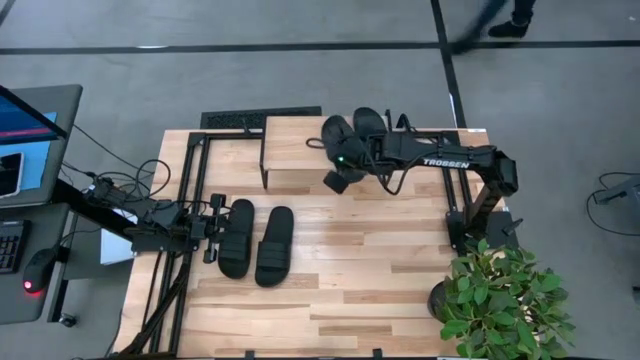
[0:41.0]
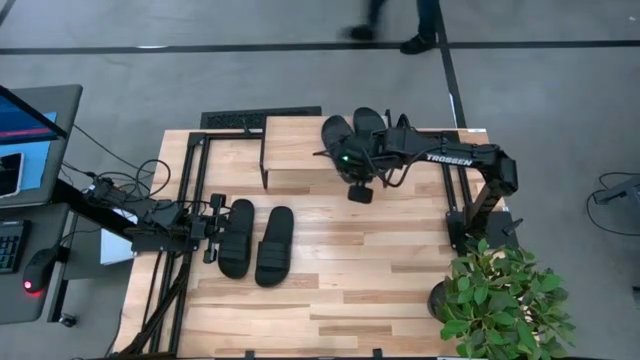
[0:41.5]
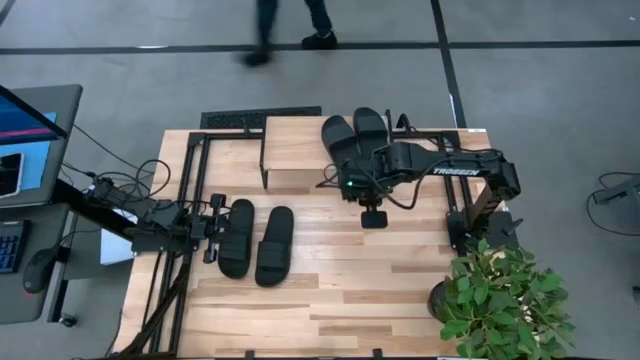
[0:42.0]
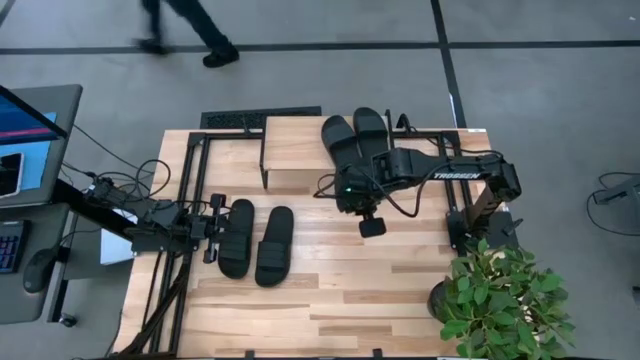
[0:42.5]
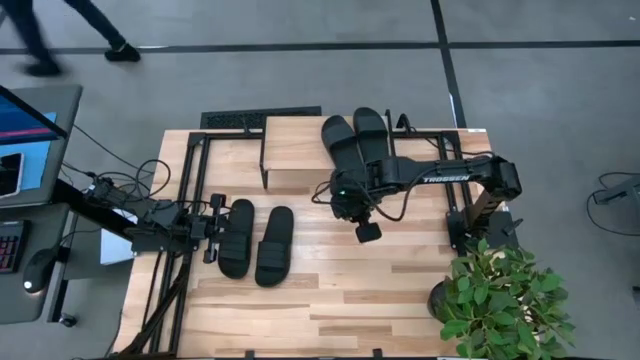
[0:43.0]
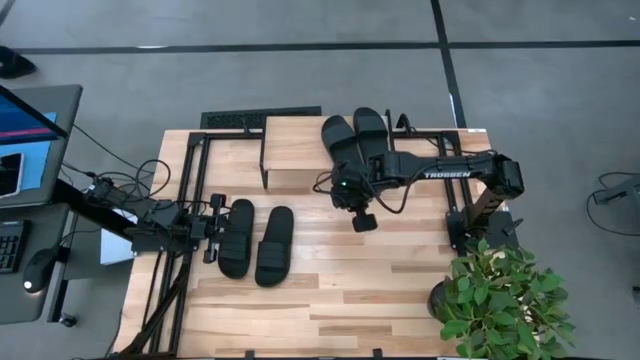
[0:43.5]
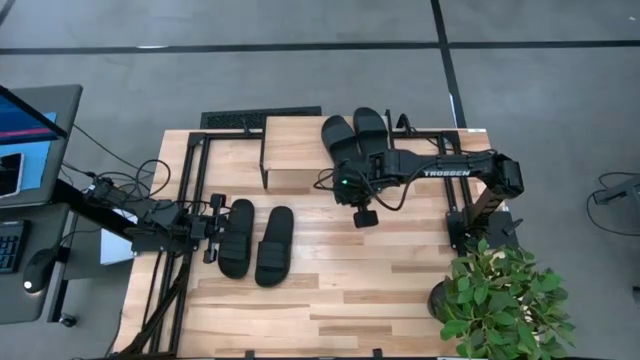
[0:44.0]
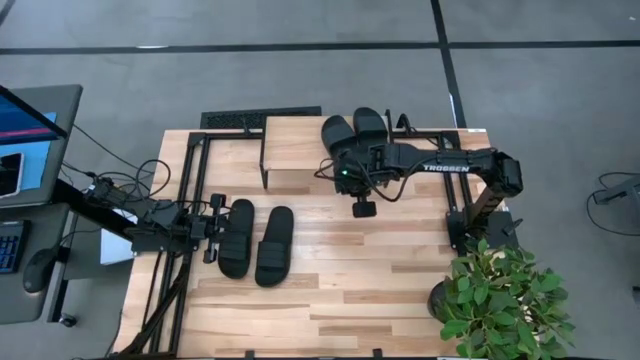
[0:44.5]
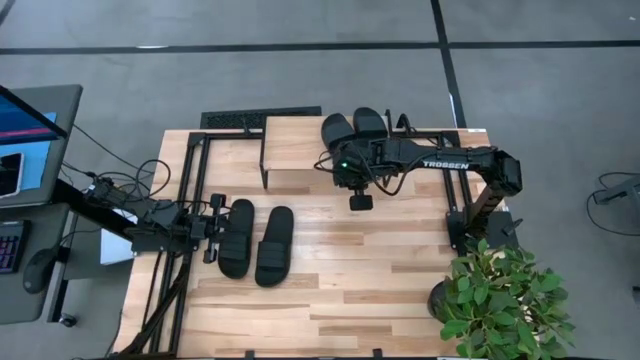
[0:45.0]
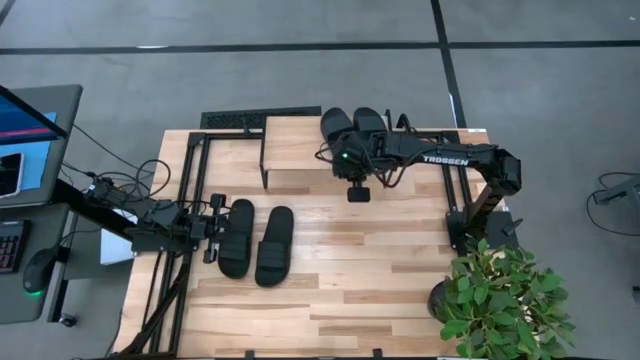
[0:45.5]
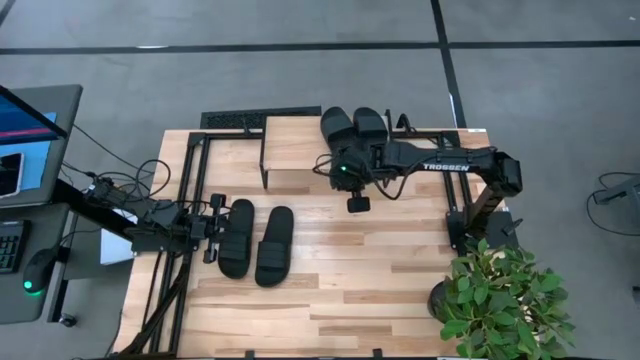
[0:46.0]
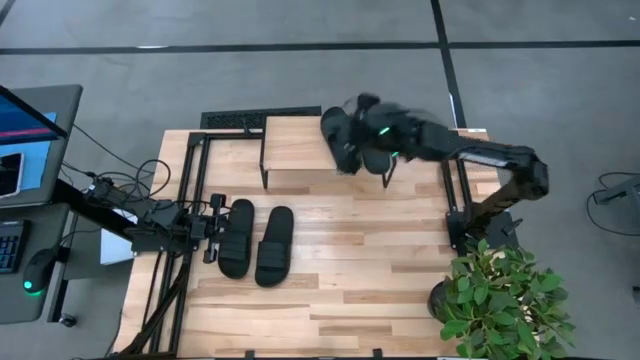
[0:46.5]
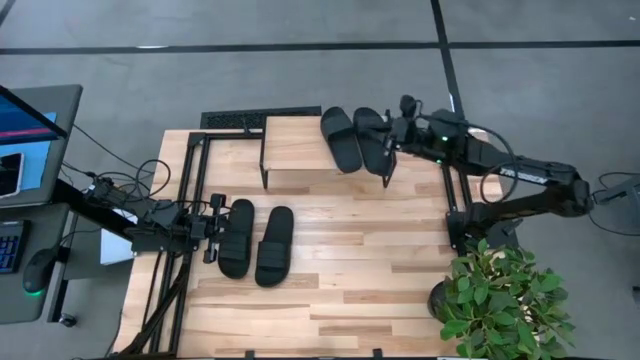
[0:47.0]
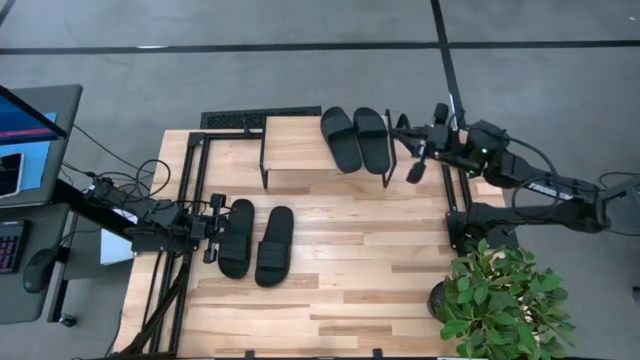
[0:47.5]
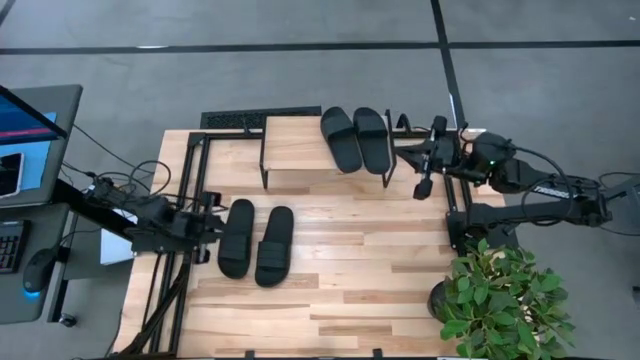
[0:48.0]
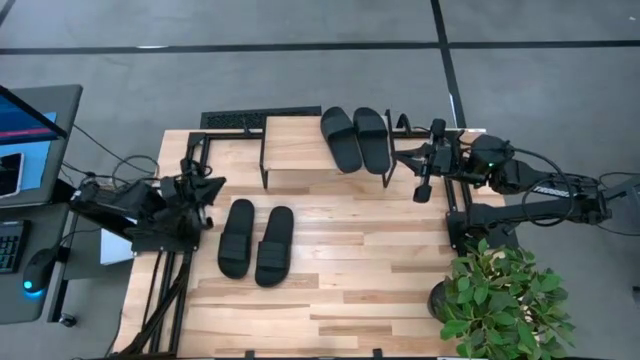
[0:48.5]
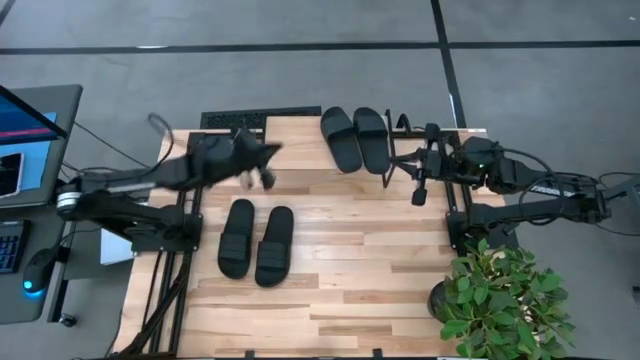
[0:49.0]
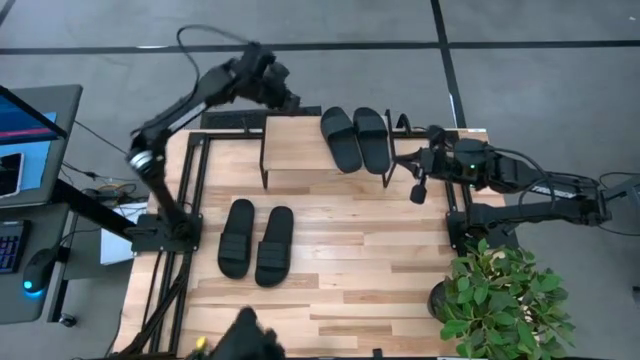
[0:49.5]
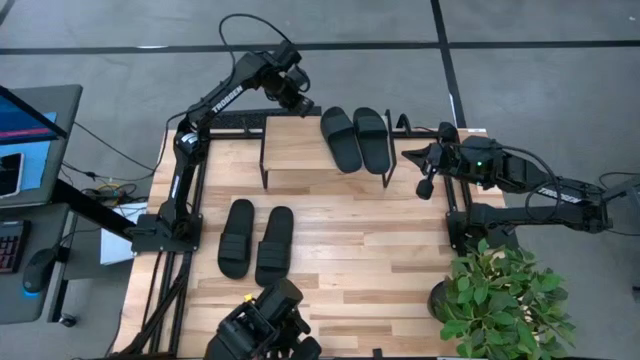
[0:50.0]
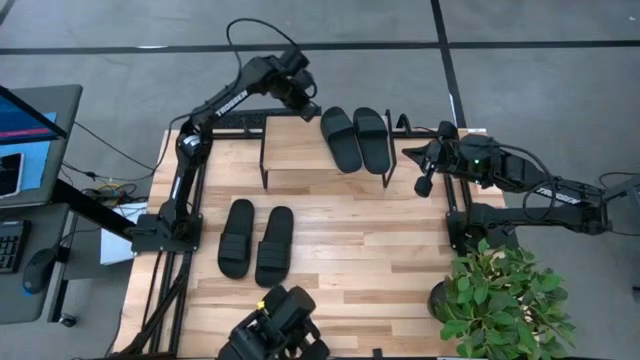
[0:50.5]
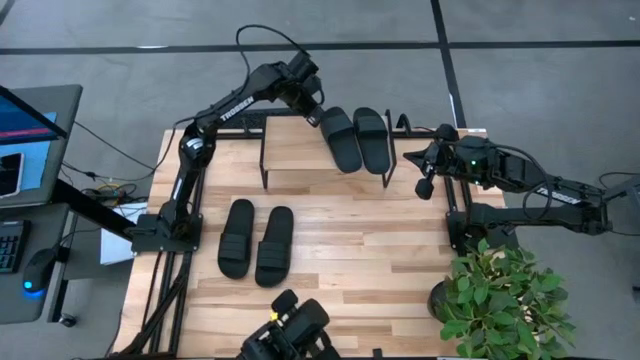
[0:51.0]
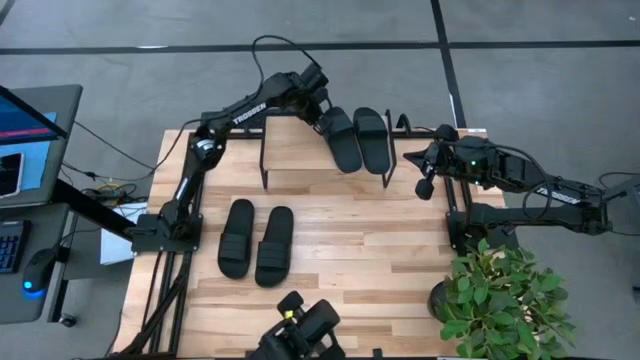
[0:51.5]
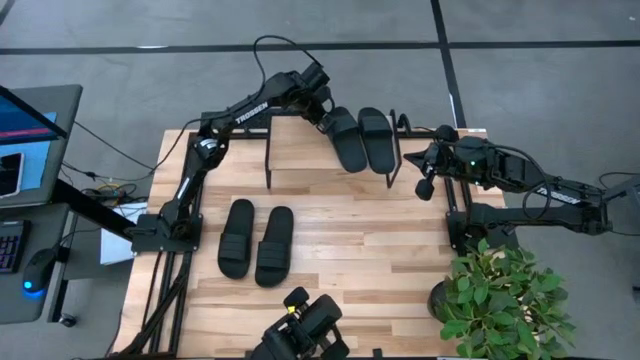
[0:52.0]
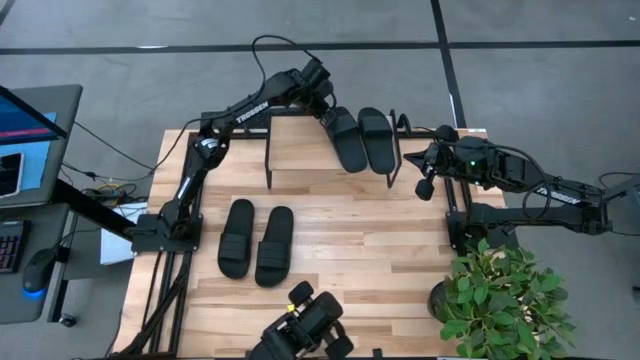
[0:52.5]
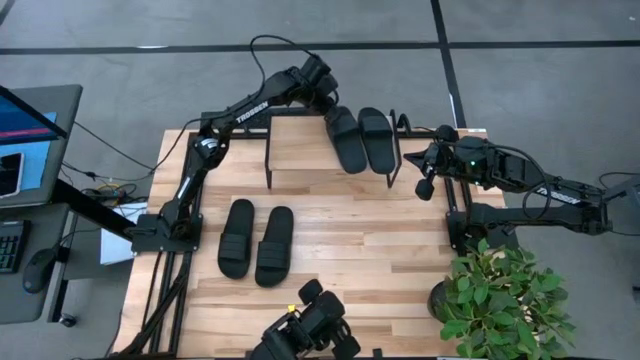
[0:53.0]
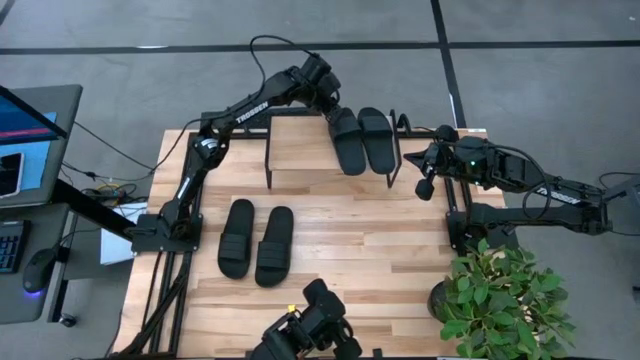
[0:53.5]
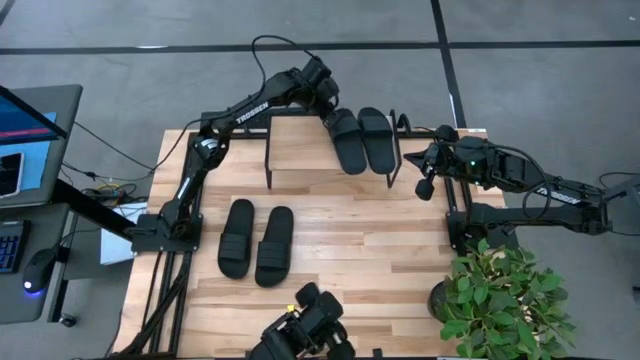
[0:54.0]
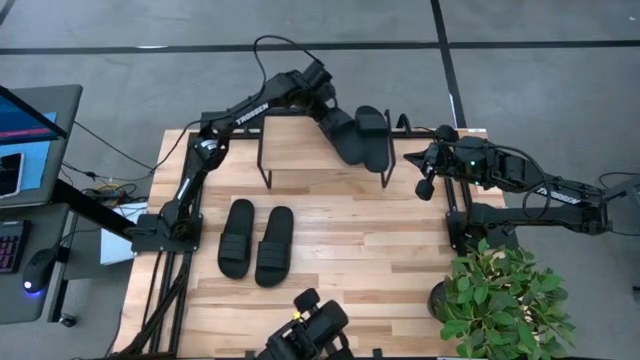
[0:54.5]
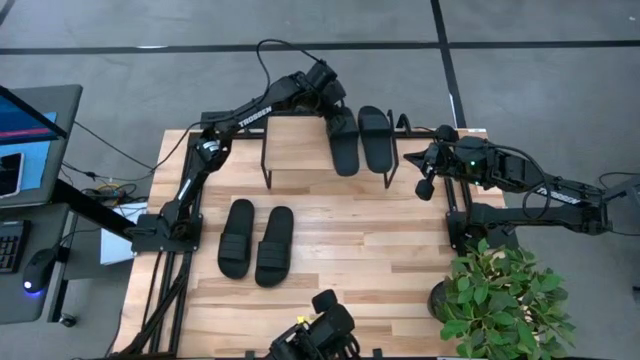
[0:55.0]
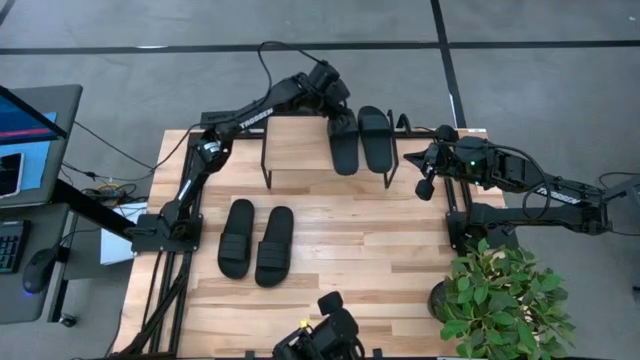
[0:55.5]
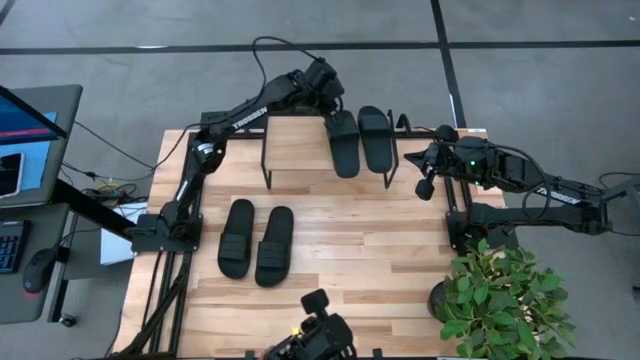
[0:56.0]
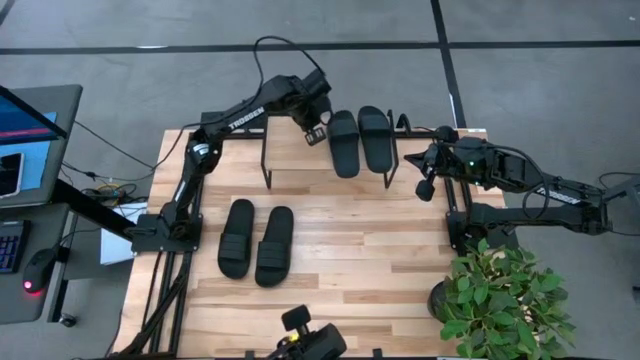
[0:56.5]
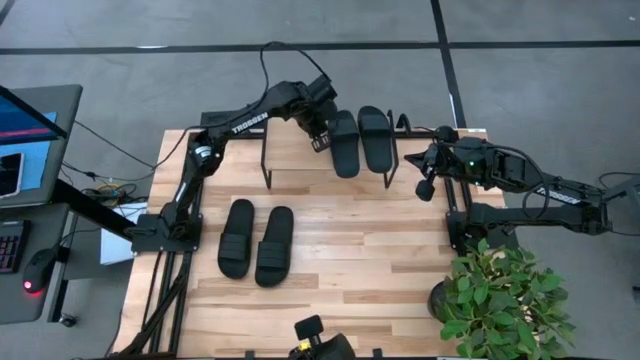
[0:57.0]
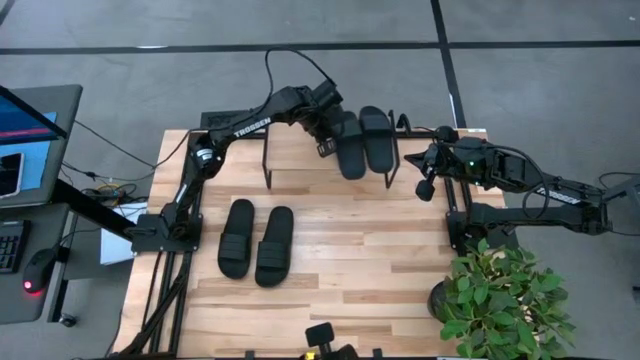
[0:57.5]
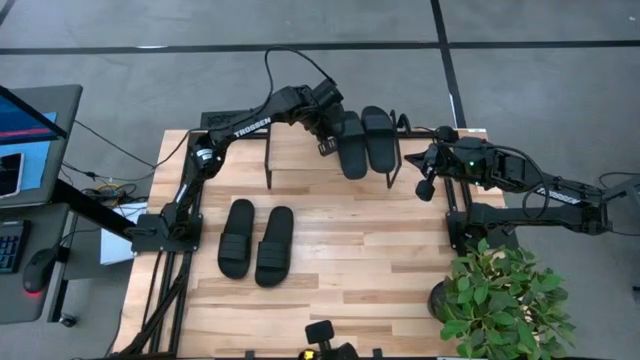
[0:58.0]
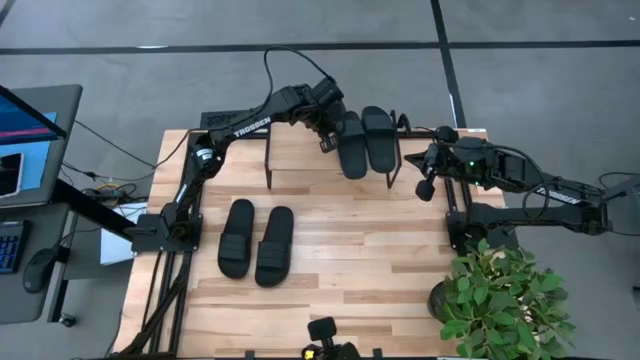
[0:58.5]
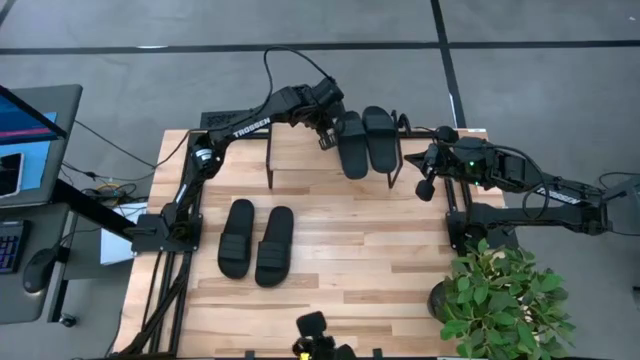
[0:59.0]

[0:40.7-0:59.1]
Task: Pick and place slides into the shelf
Put the right black slide on the shelf

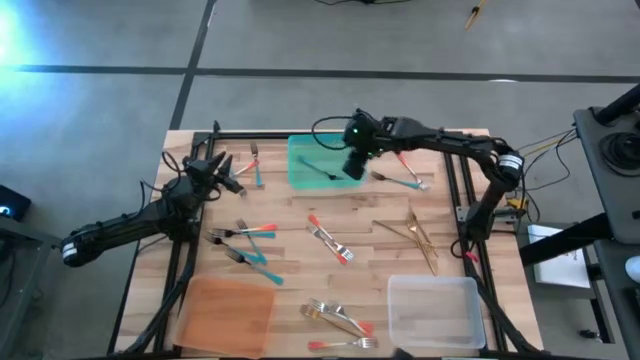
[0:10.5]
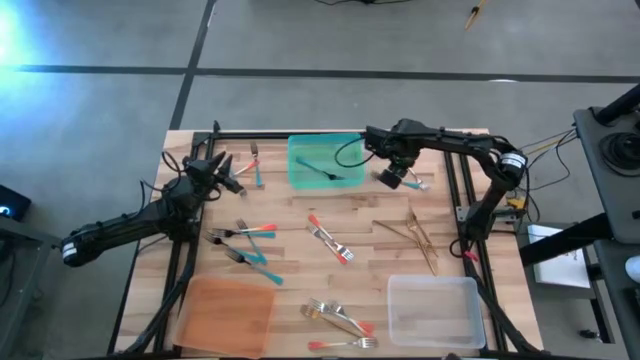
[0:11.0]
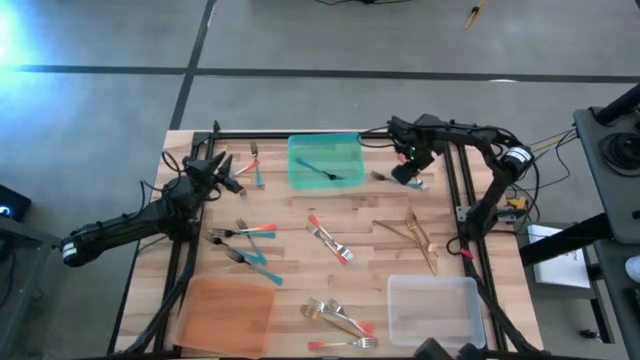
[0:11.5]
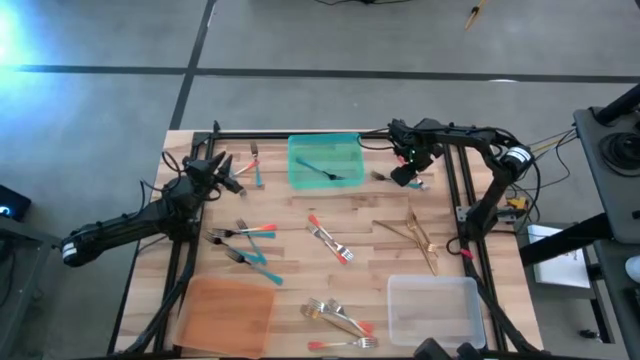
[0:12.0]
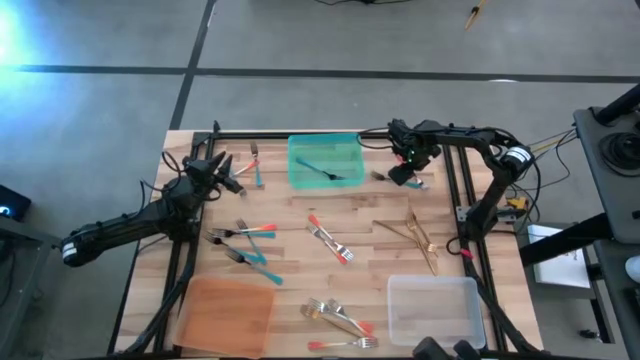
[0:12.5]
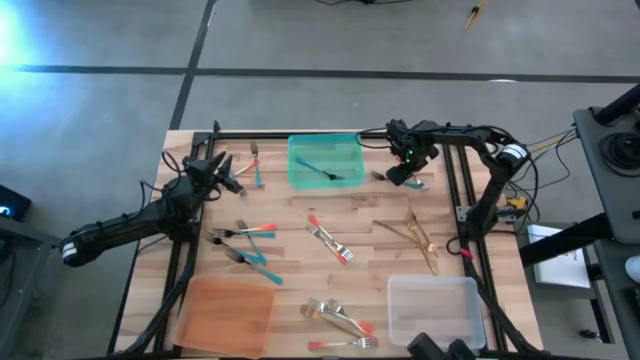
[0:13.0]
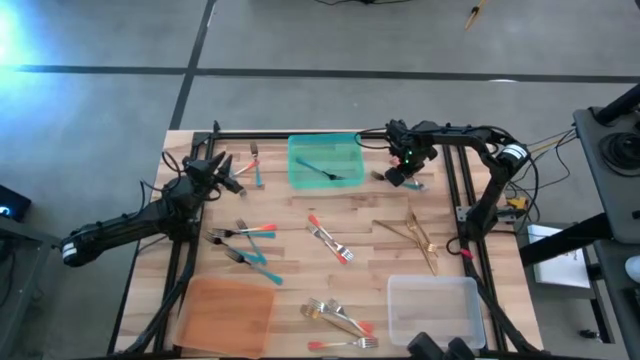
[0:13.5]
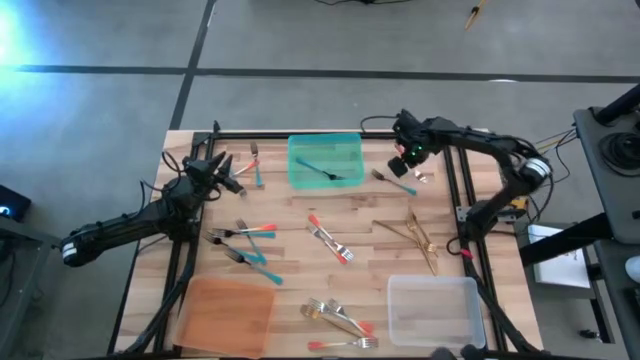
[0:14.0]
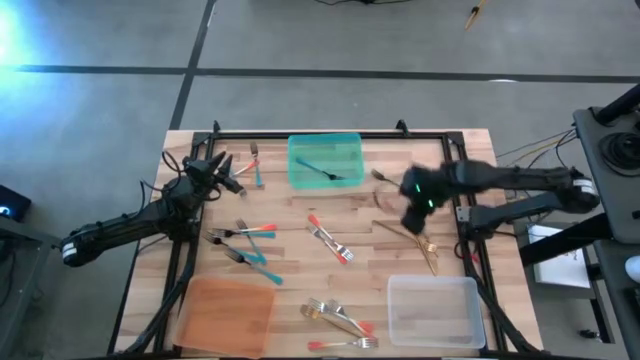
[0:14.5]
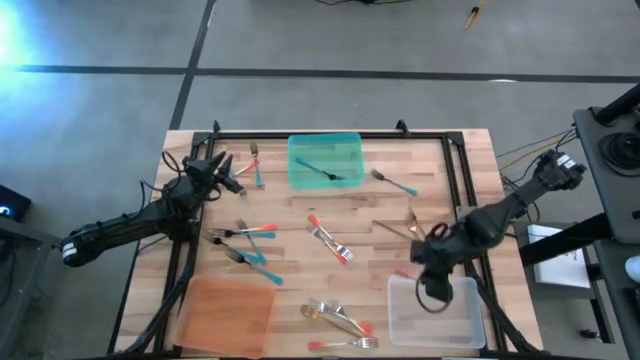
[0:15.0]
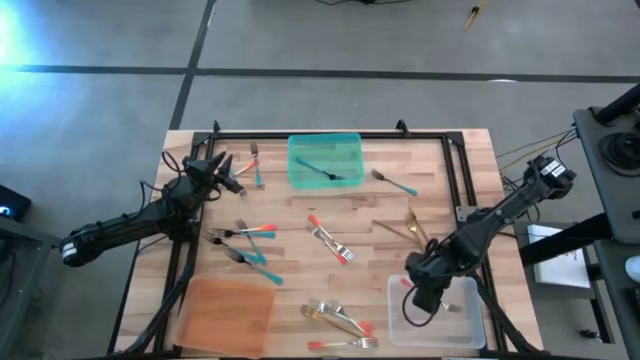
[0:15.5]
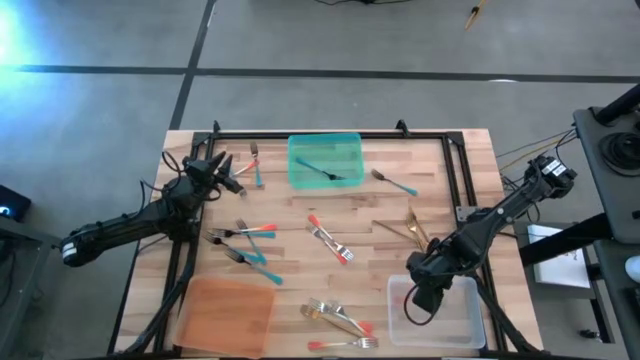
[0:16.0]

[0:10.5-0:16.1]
Task: Sort silverware by color (type)
Put the orange fork into the transparent bin
